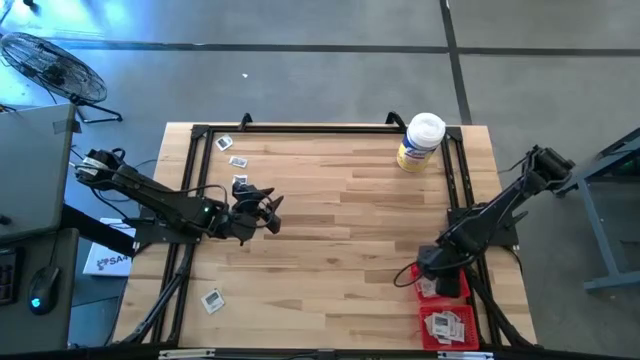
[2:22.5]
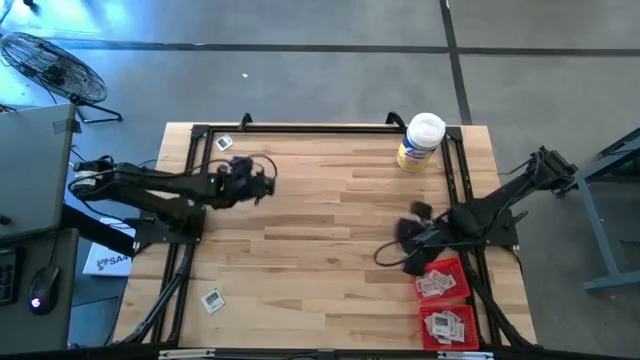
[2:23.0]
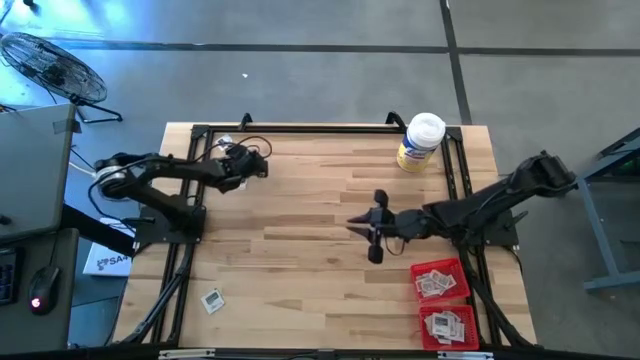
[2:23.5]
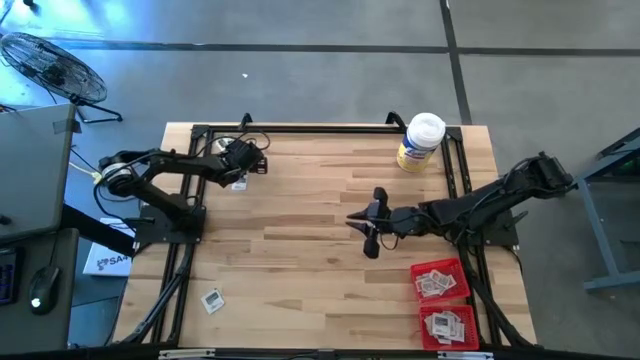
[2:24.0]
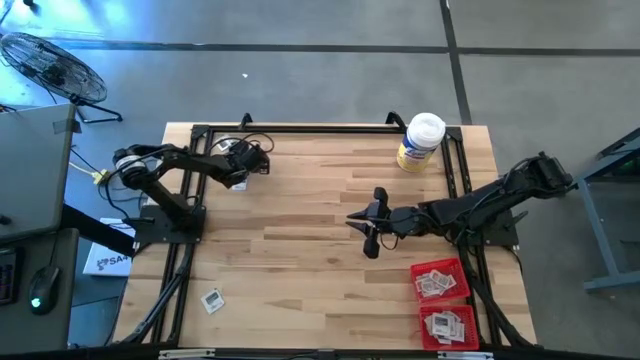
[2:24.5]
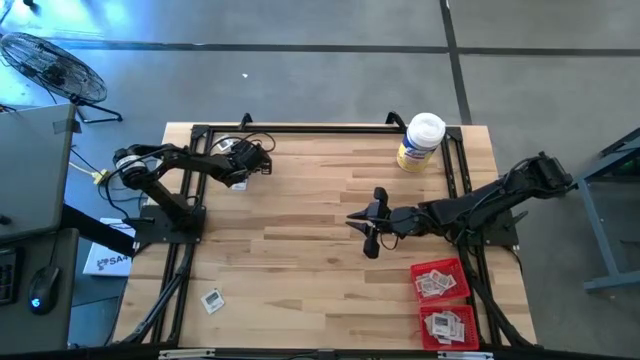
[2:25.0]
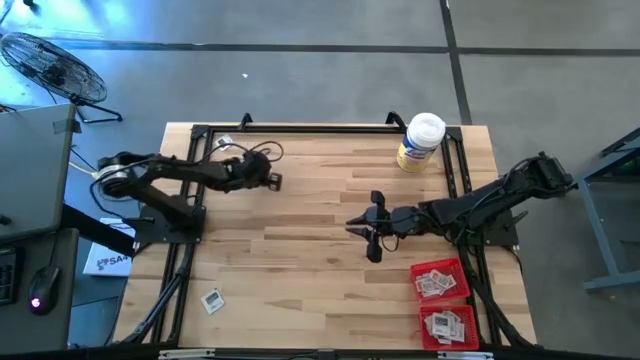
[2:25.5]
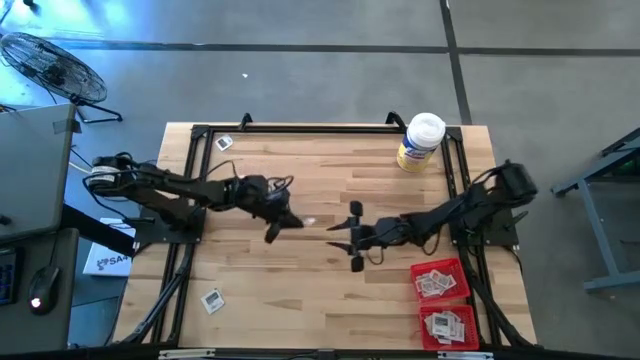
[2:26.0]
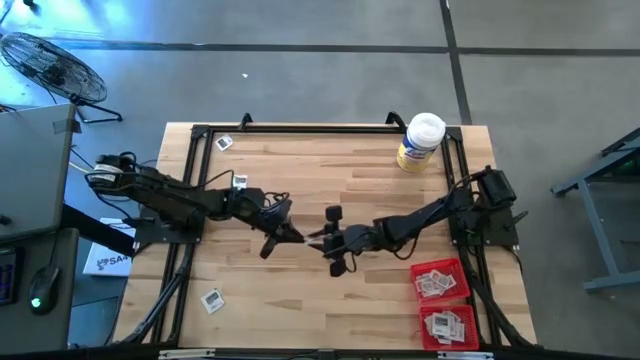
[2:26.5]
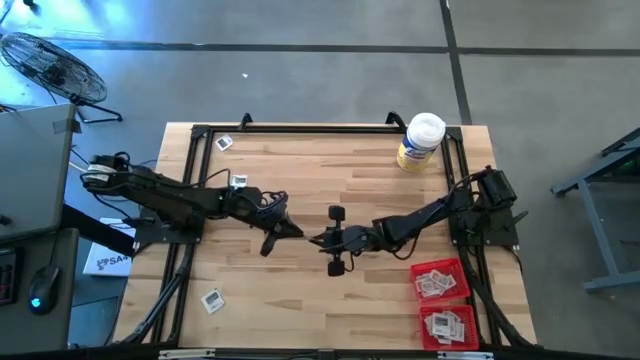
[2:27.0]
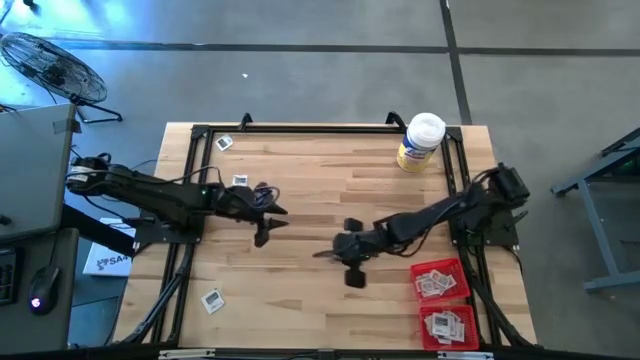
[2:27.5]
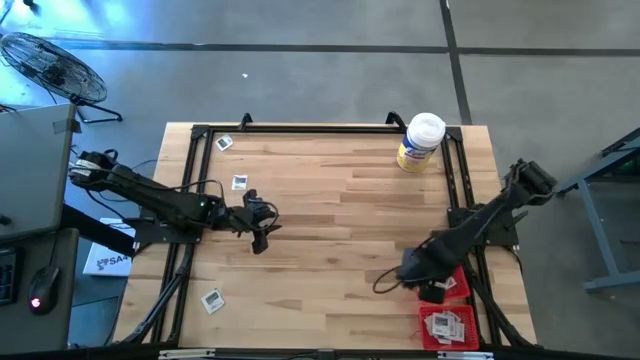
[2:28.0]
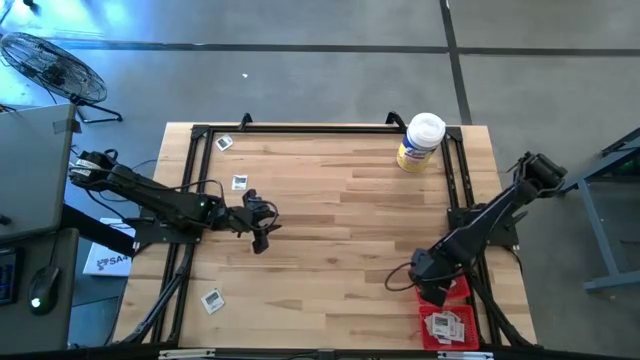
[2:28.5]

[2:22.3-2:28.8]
Task: Pick & Place First Aid Supplies
Put the white ointment pack into the top red bin

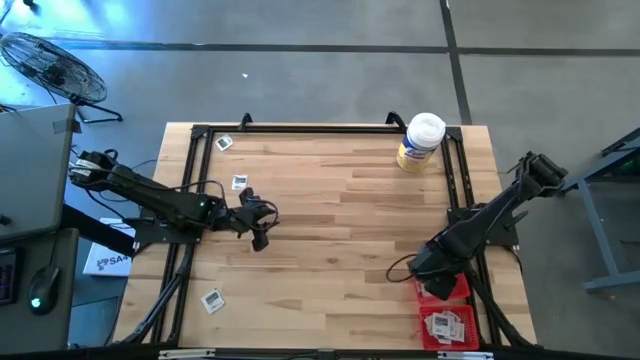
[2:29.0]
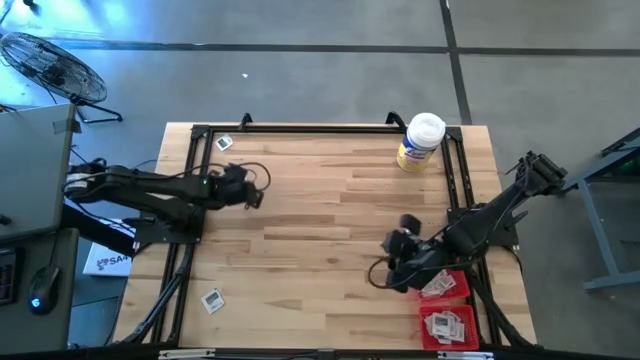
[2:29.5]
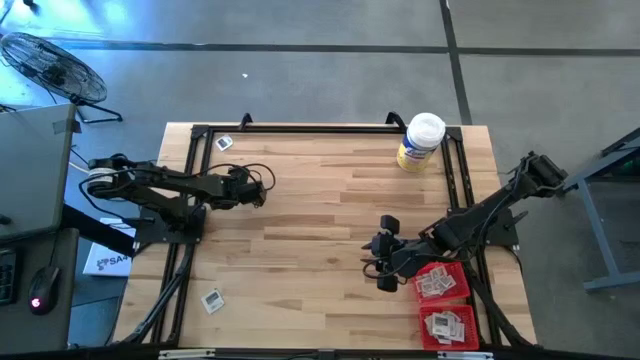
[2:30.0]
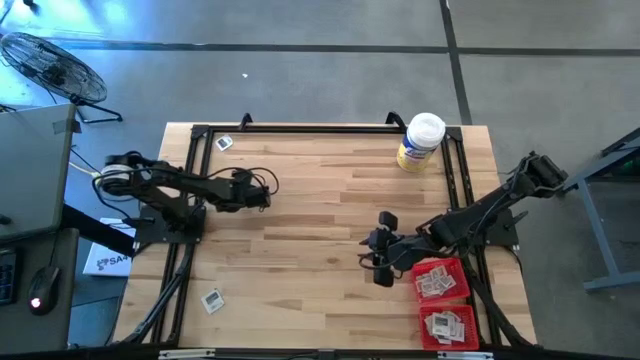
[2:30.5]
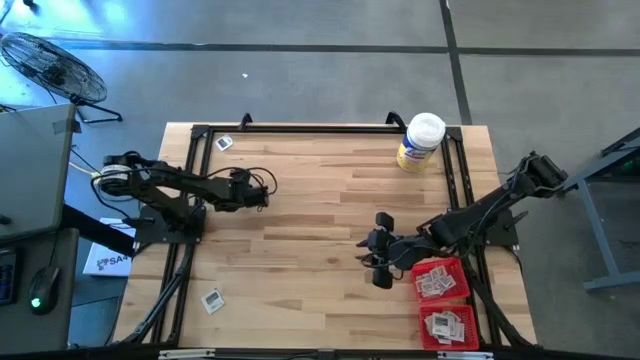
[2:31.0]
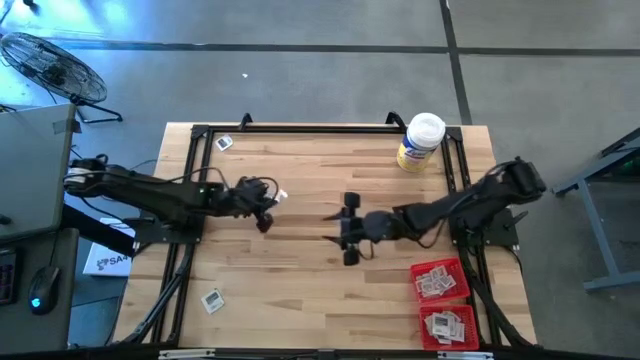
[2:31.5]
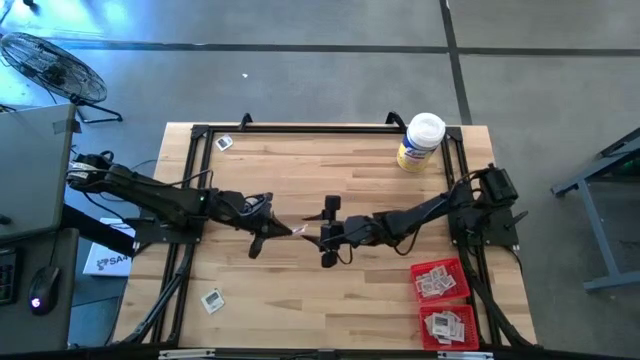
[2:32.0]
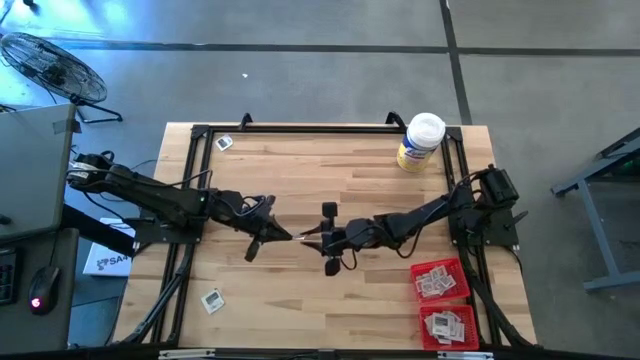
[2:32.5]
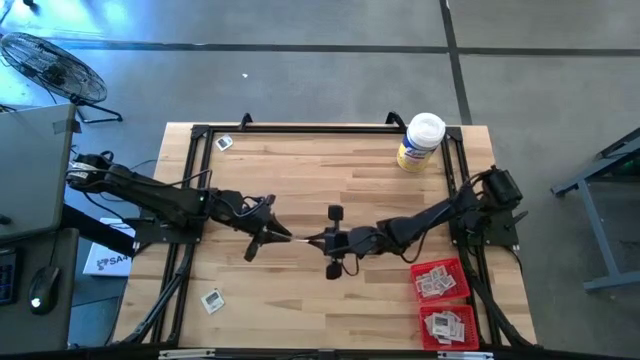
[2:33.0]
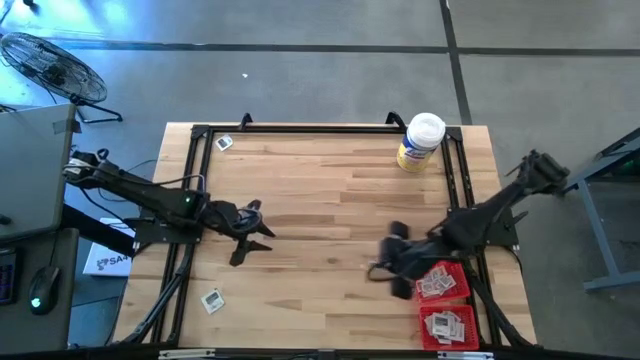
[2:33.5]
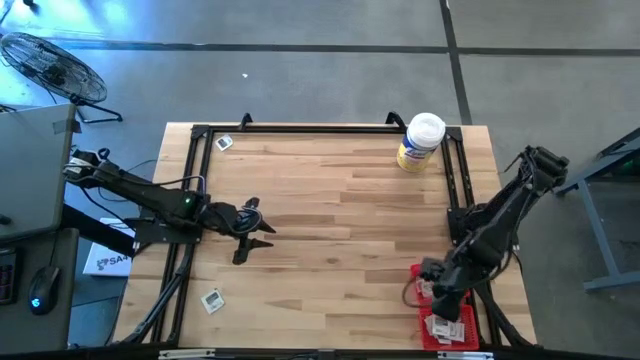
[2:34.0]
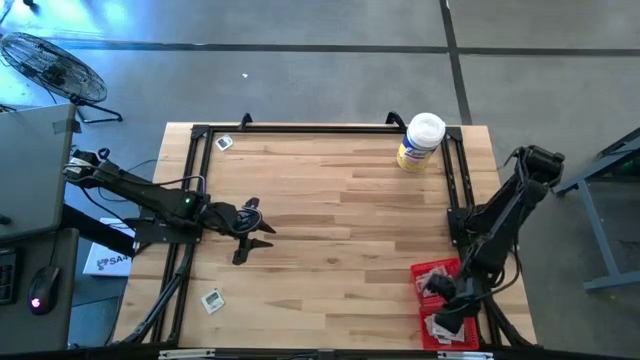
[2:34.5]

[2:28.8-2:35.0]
Put the white towelette pack into the bottom red bin

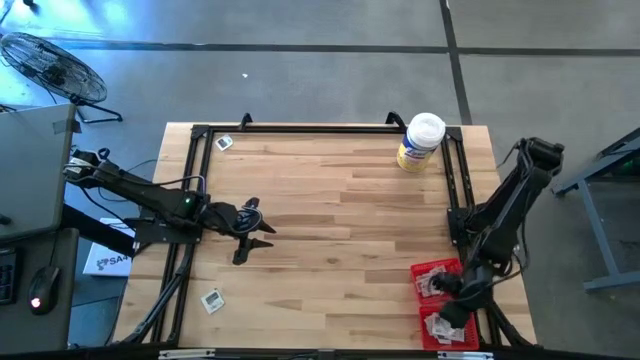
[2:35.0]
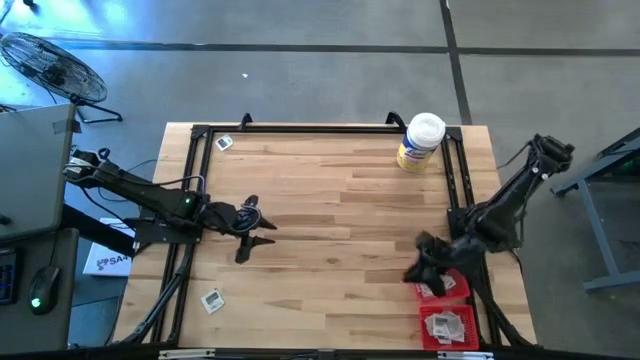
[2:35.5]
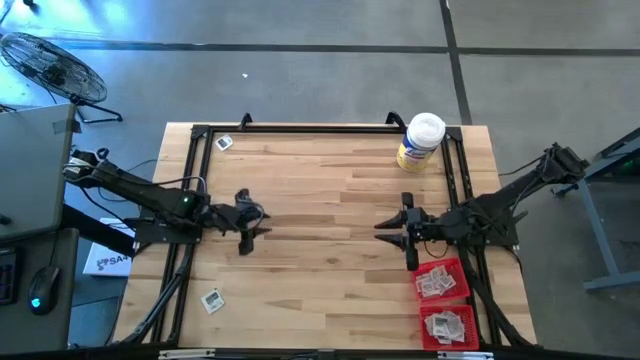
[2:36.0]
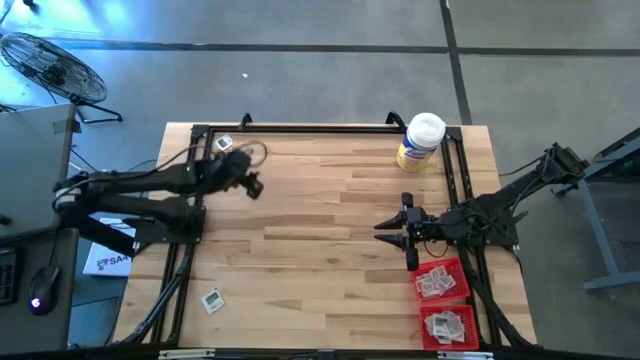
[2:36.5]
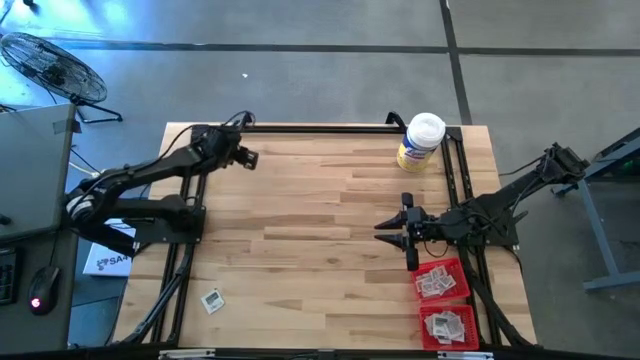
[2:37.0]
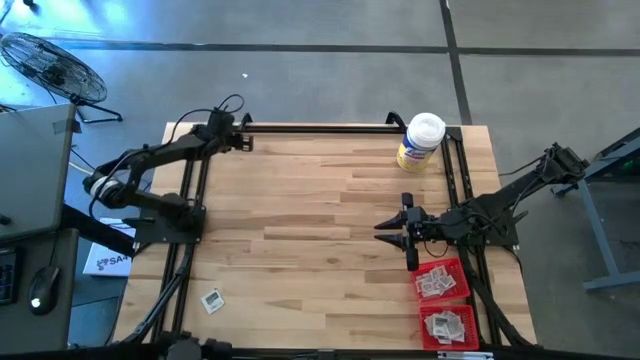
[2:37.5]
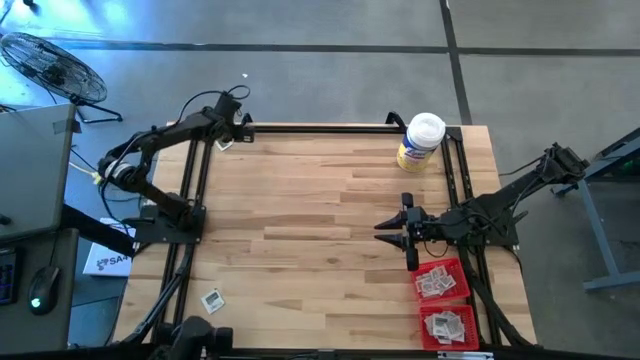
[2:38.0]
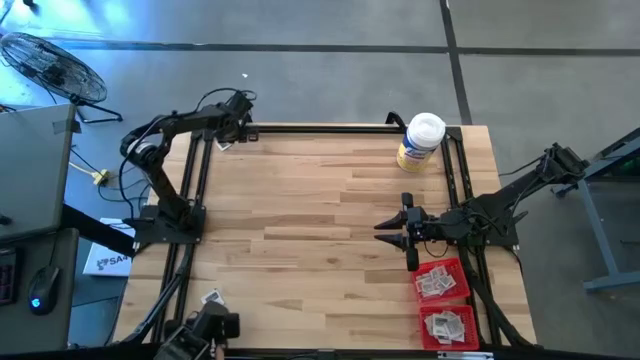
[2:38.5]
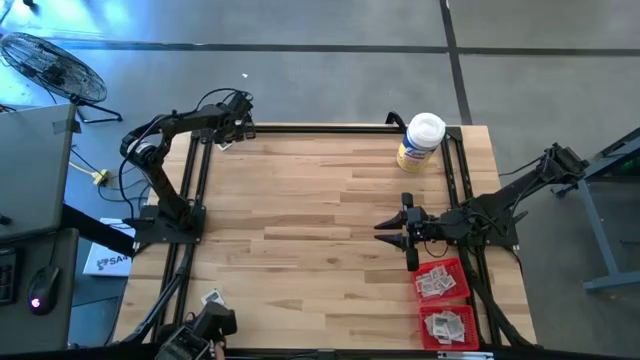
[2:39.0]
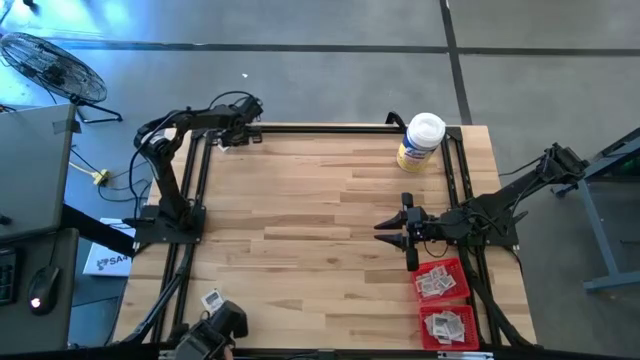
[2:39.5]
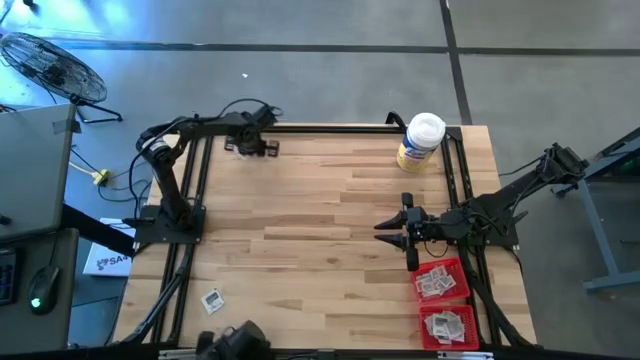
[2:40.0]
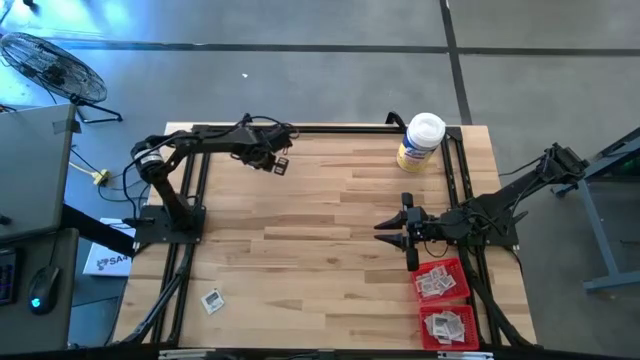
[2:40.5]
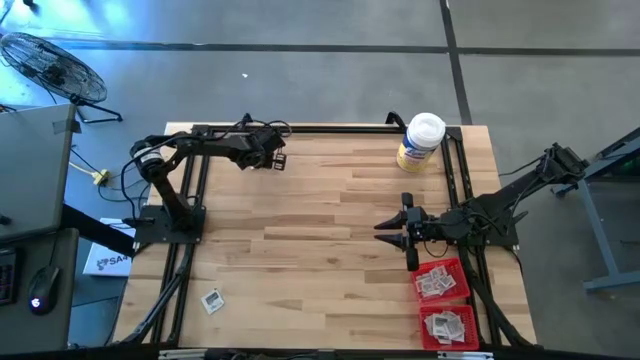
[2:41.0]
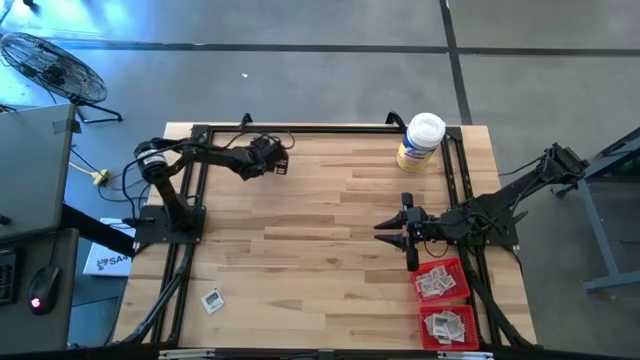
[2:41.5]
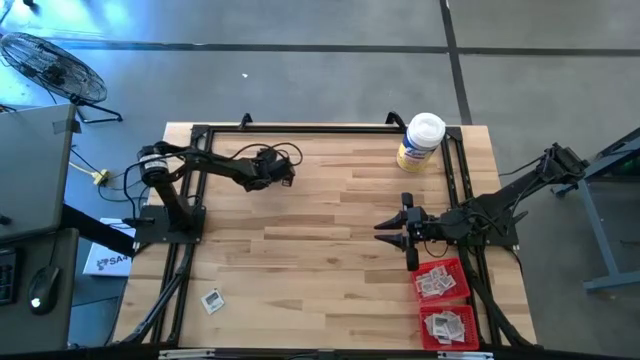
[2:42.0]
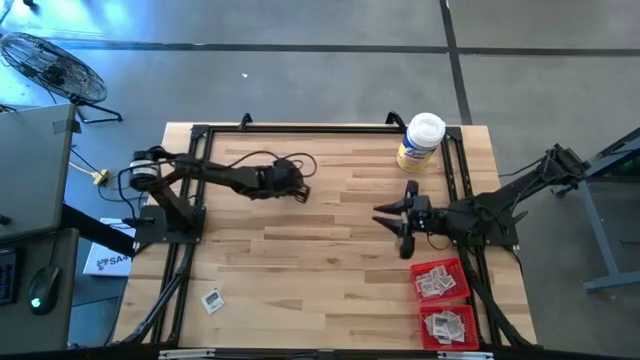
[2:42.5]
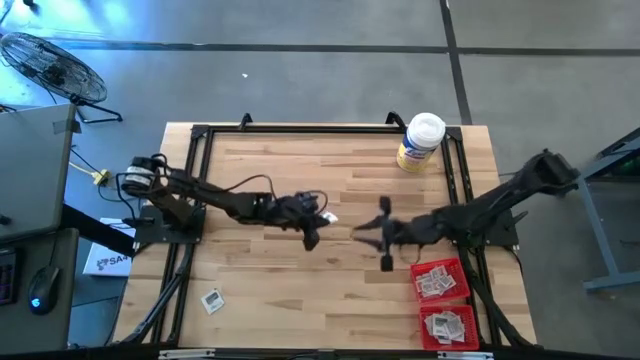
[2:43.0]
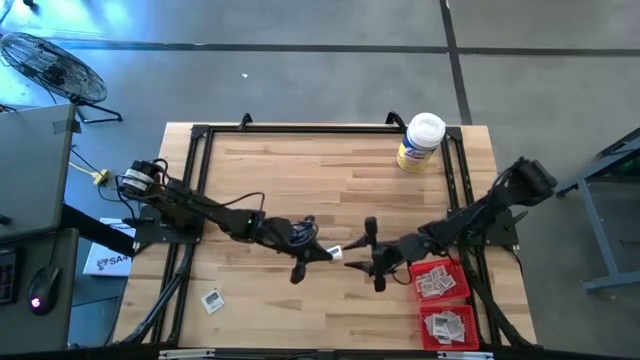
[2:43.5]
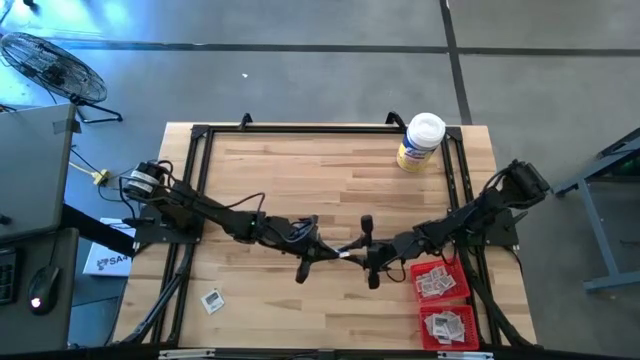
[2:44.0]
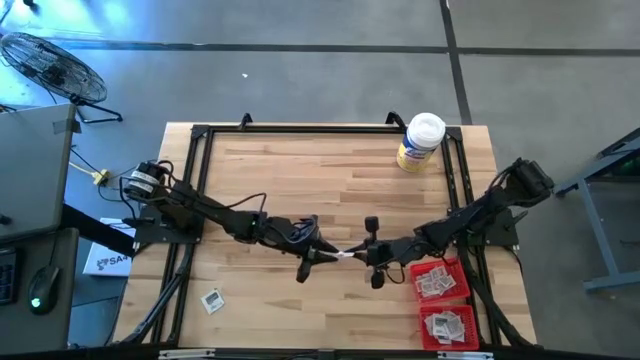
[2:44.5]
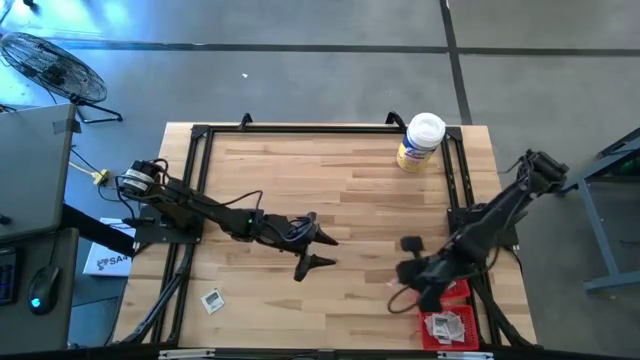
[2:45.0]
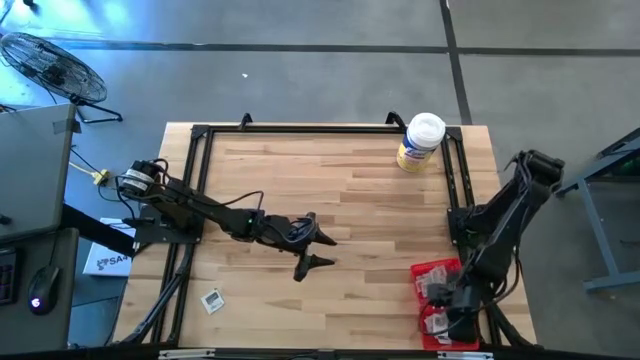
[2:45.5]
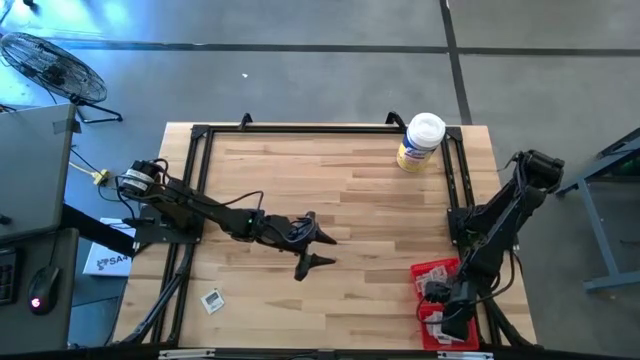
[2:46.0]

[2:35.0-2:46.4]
Put the white towelette pack into the bottom red bin
